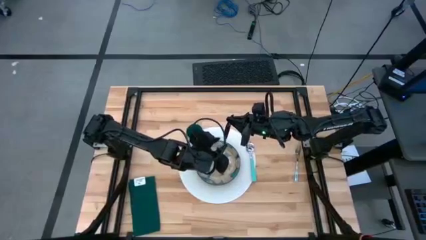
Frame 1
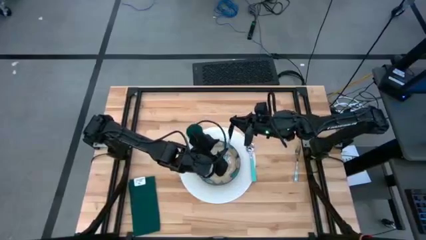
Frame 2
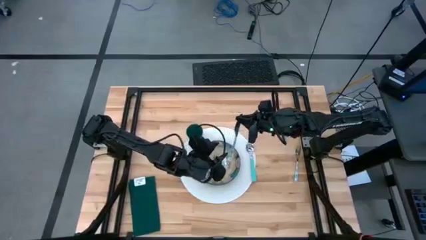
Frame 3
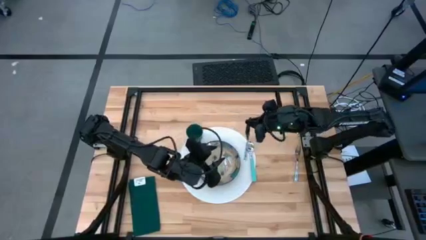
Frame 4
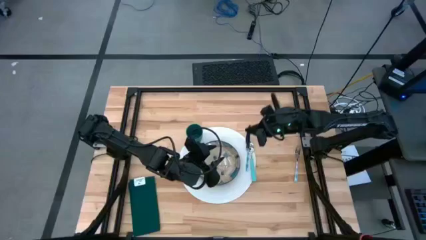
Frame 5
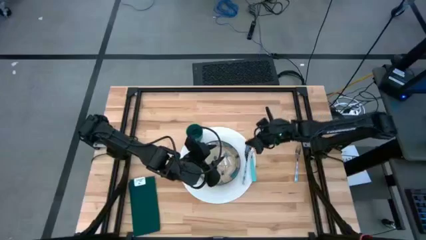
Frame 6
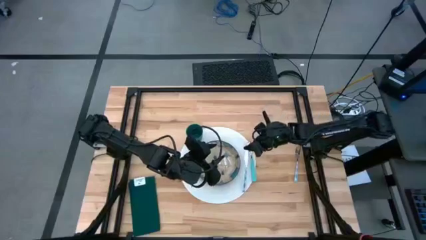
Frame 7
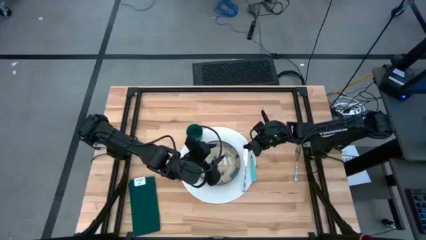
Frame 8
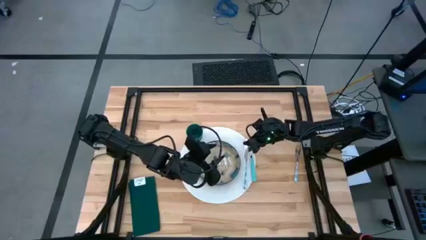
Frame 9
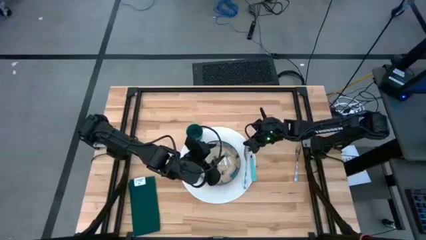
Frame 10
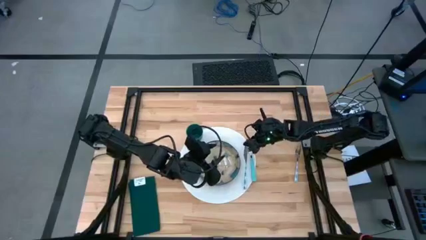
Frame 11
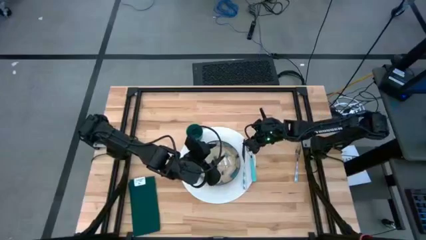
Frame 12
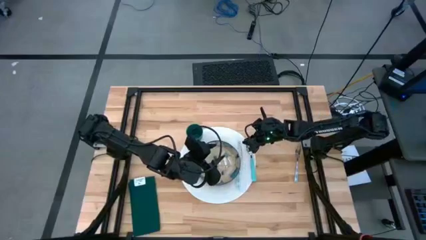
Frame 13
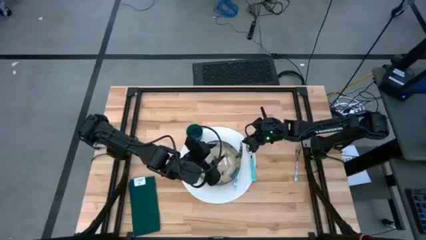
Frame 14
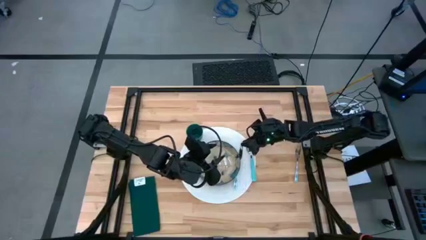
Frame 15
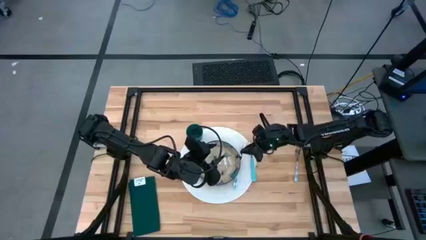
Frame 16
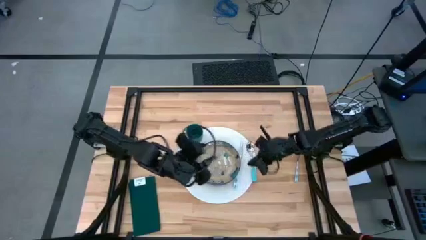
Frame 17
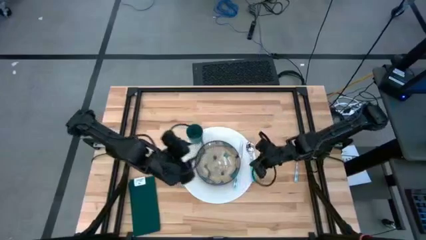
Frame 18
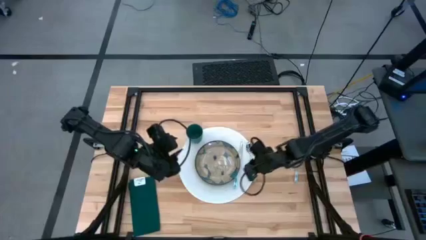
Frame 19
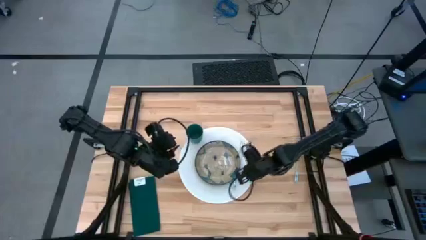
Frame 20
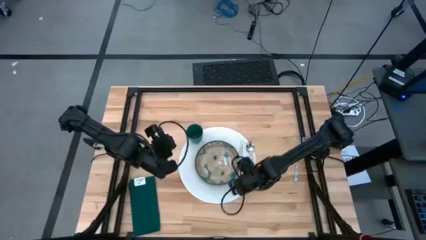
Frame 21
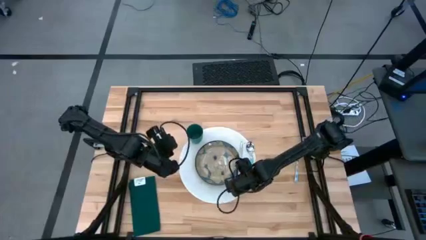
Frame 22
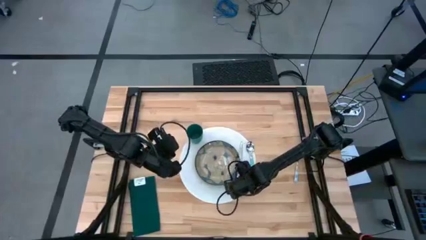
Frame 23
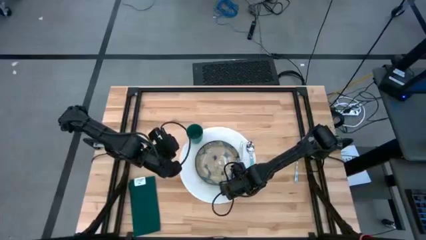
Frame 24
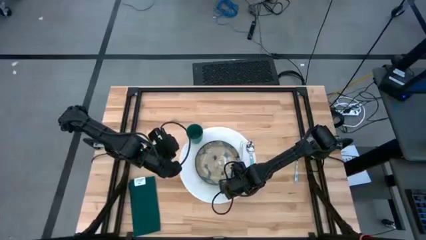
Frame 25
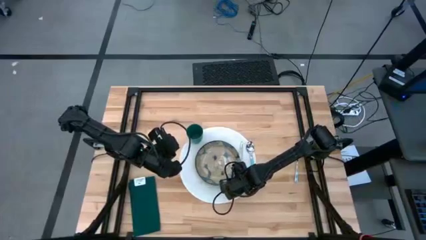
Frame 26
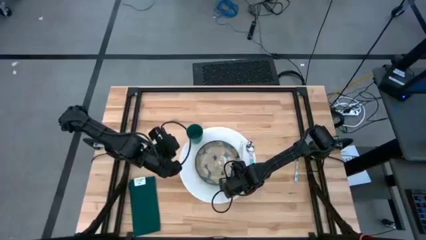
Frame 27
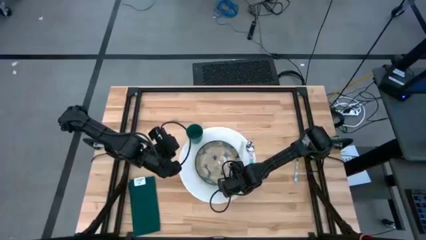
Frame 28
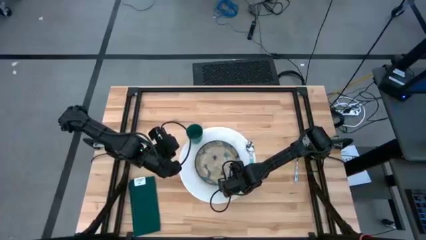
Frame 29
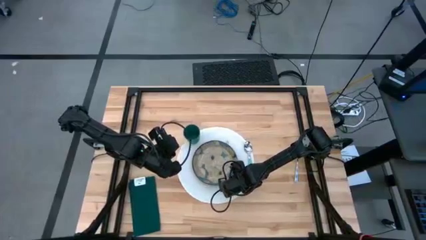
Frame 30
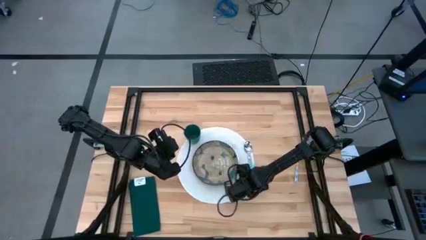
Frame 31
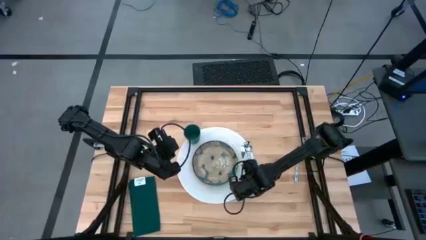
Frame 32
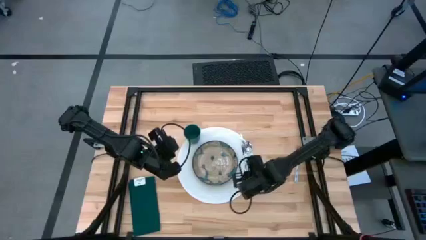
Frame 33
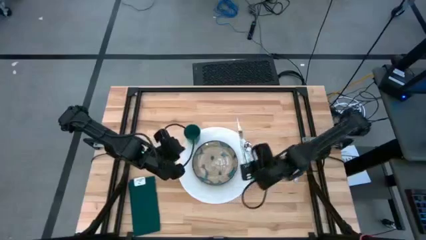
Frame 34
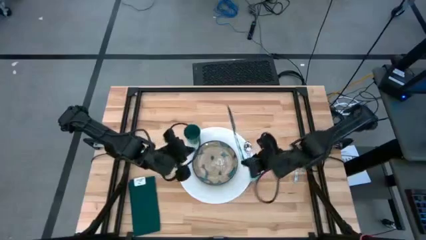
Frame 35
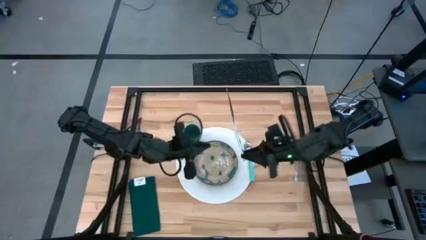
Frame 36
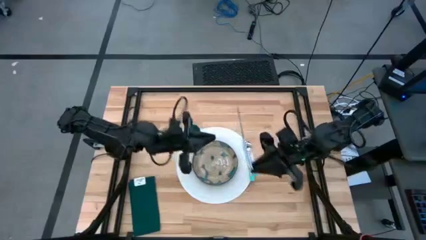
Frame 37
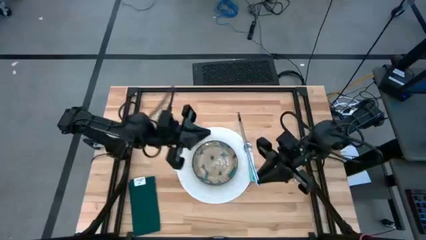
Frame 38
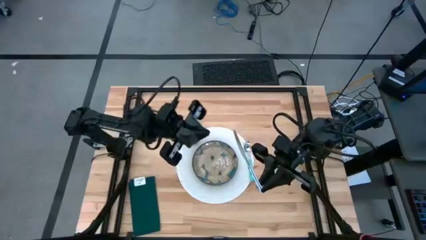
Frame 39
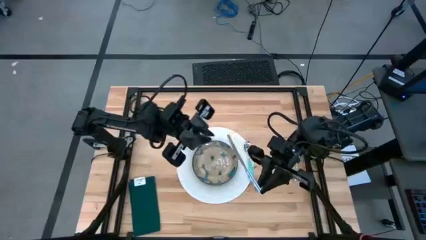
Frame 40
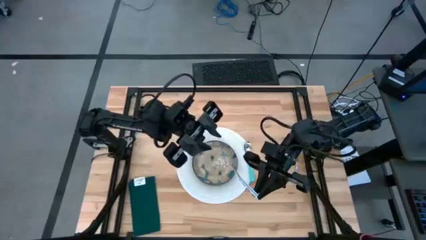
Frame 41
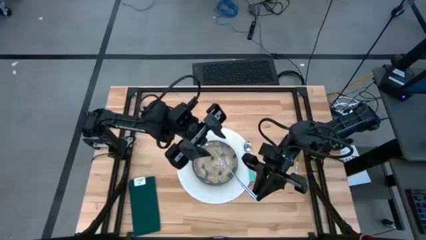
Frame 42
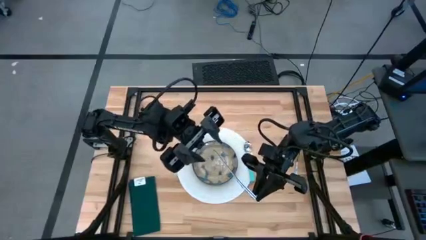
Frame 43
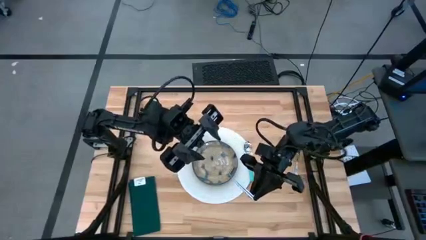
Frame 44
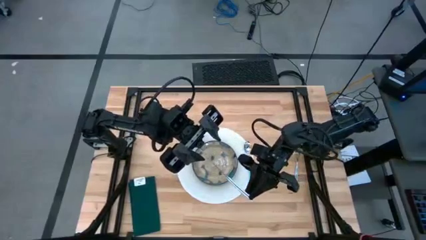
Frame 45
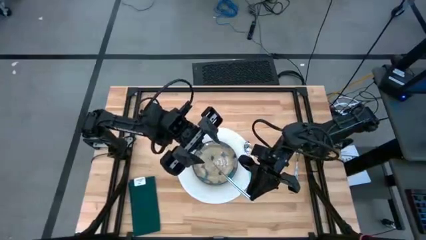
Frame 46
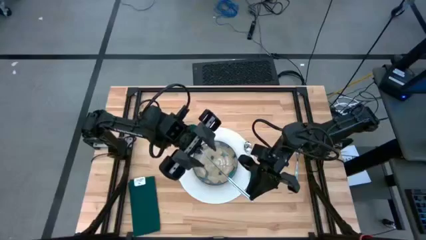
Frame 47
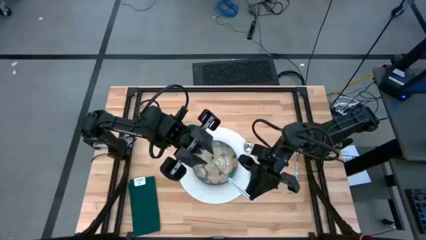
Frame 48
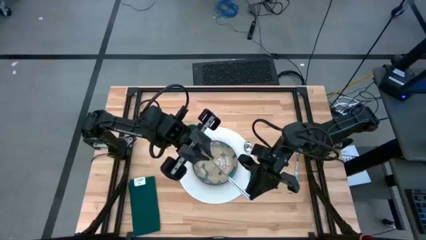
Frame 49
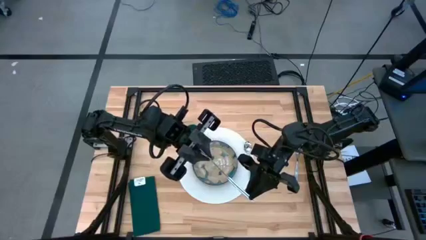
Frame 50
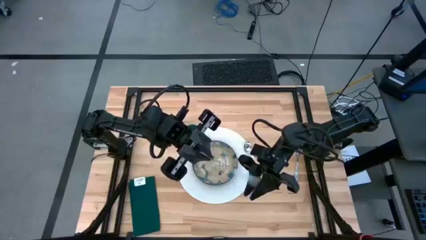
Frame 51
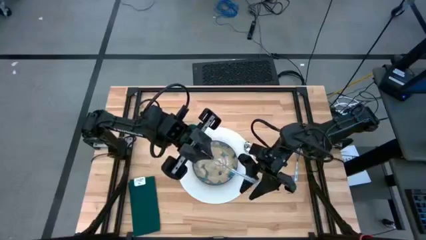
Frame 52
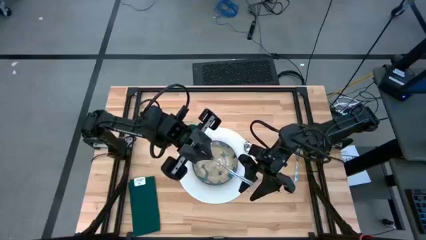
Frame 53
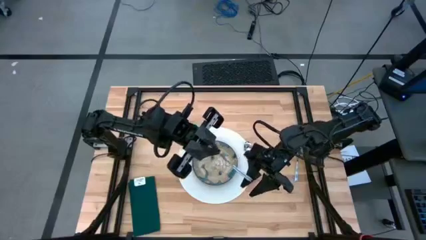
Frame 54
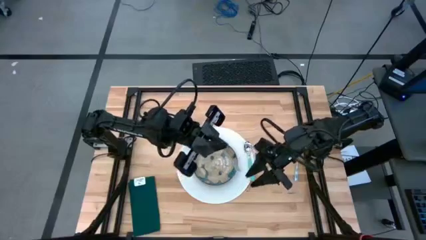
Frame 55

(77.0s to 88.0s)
Task: Set table place
Put the blue knife on the right of the white table mat

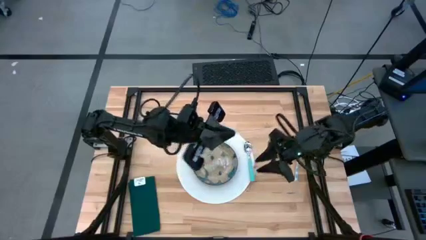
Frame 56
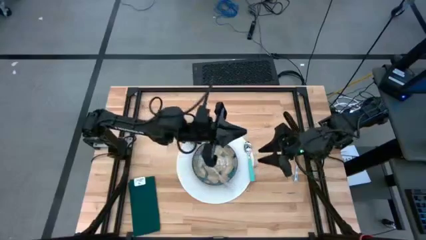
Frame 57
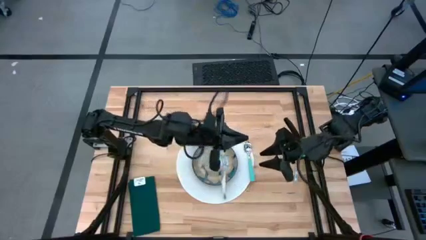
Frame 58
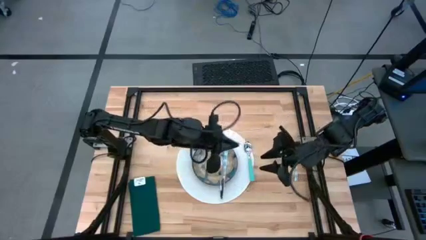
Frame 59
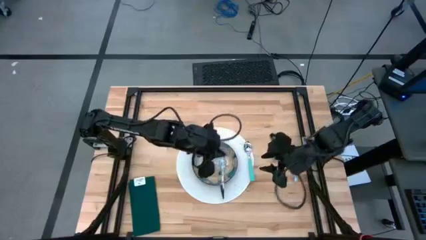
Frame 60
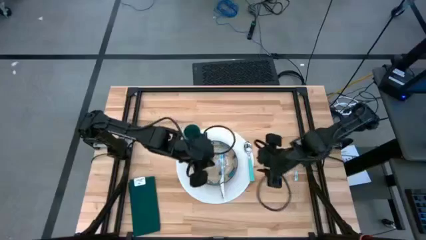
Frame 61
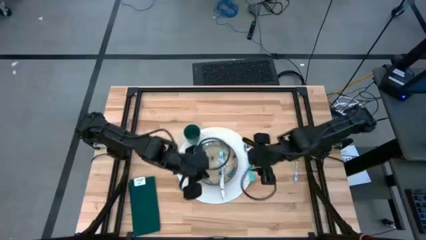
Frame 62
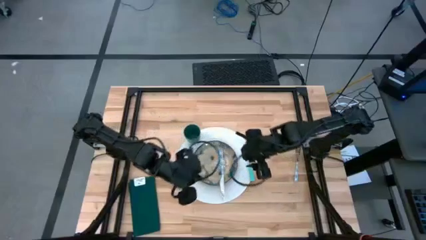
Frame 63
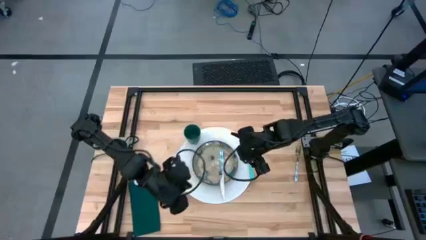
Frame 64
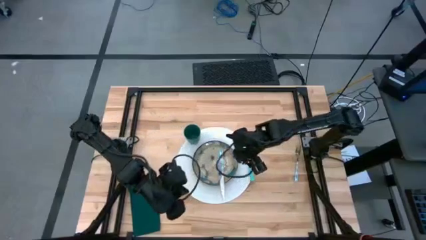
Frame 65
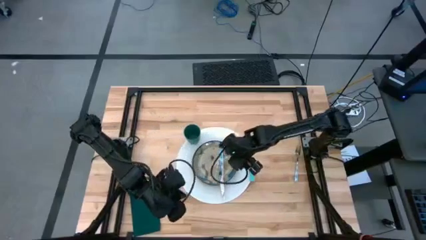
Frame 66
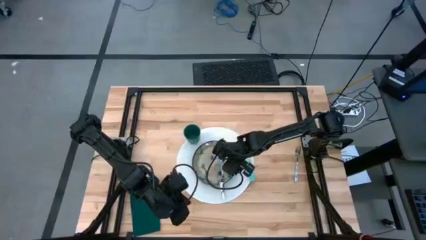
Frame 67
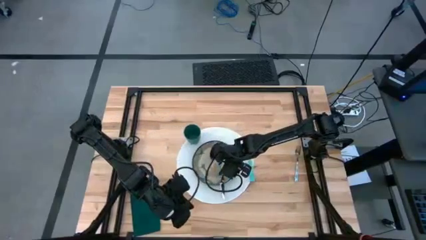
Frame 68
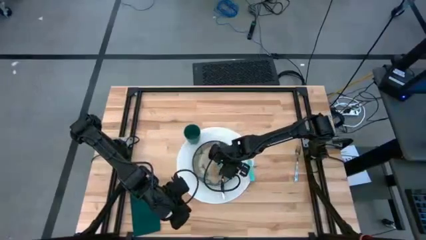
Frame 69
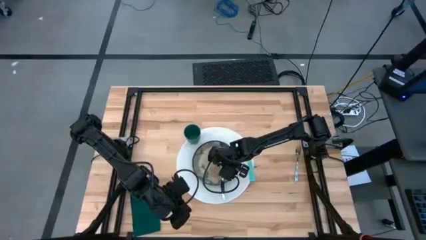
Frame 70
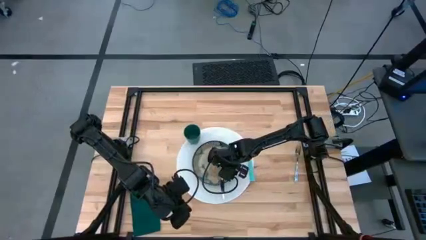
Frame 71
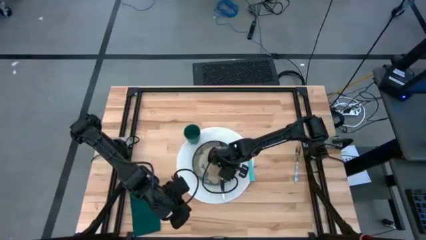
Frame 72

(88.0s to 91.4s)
Put the blue knife on the right of the white table mat
